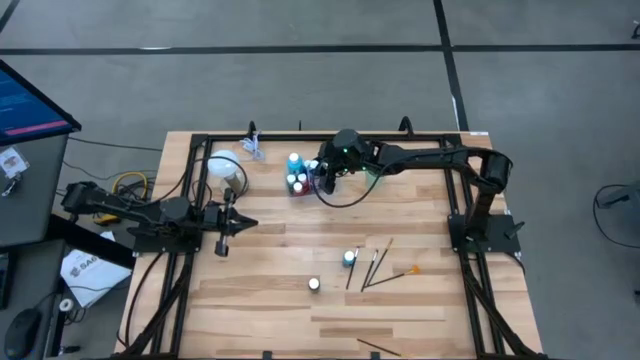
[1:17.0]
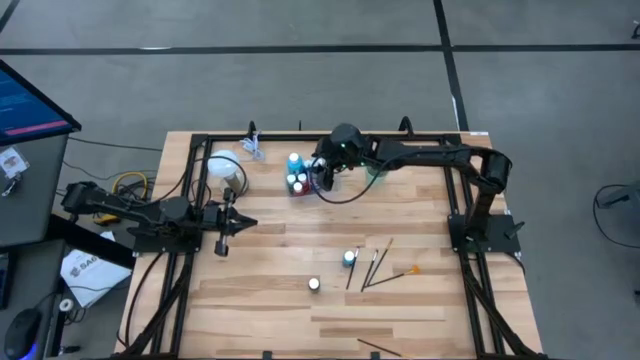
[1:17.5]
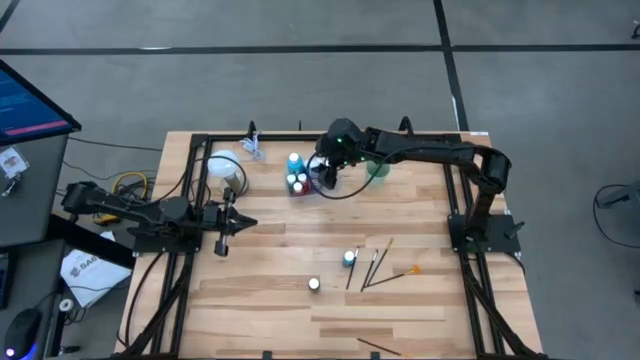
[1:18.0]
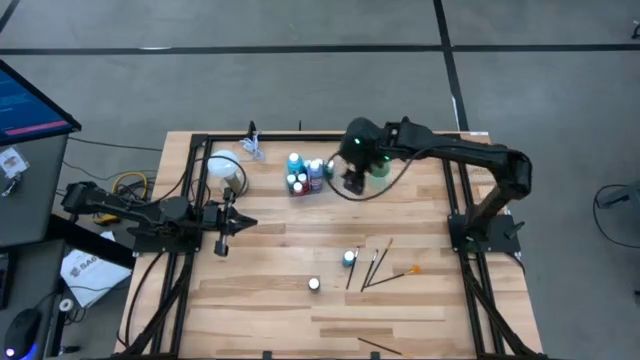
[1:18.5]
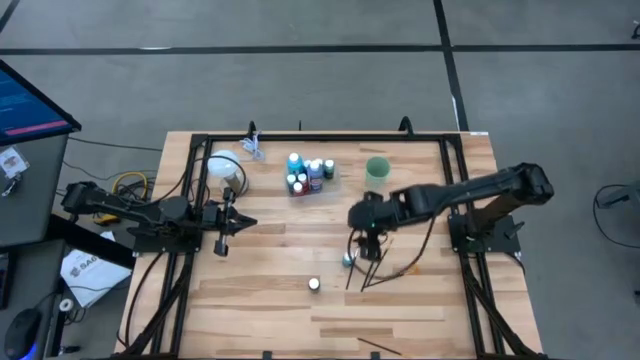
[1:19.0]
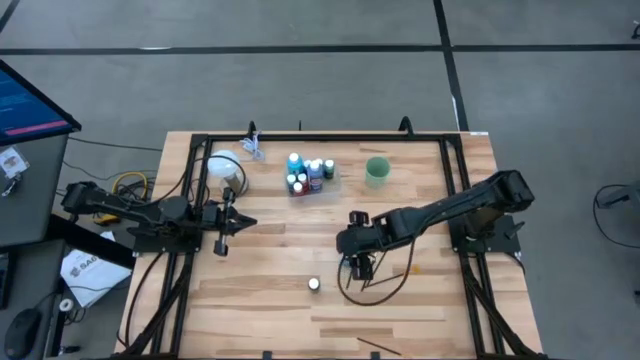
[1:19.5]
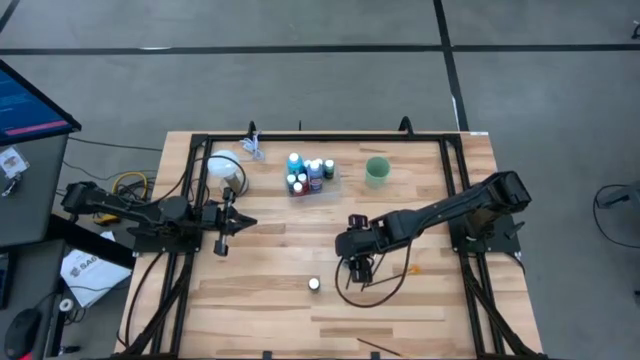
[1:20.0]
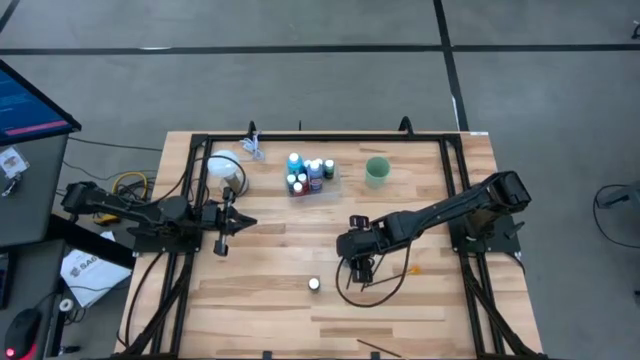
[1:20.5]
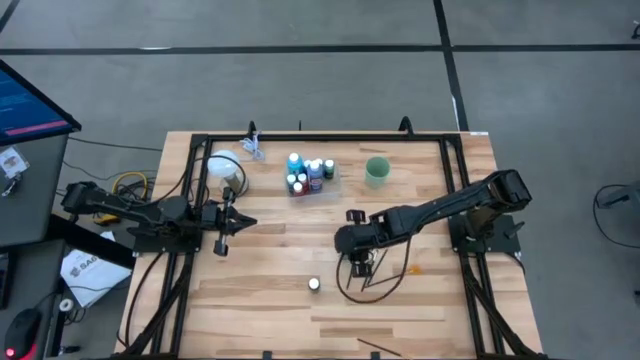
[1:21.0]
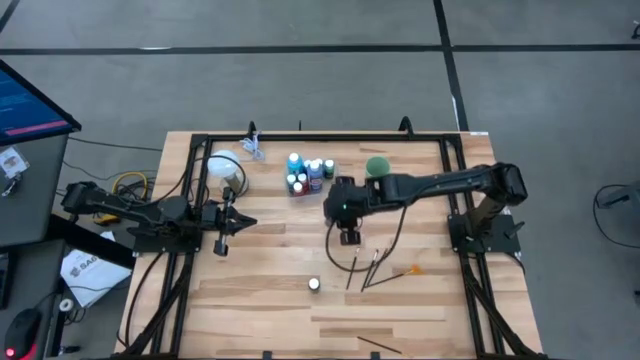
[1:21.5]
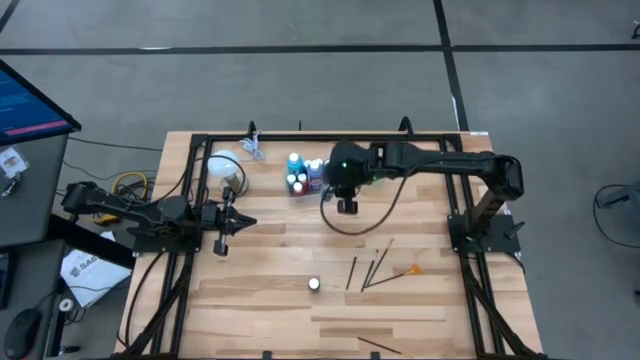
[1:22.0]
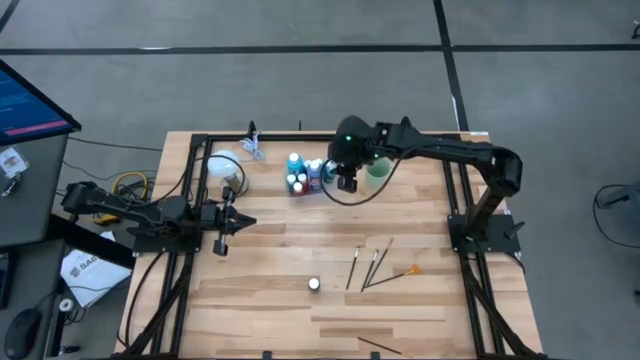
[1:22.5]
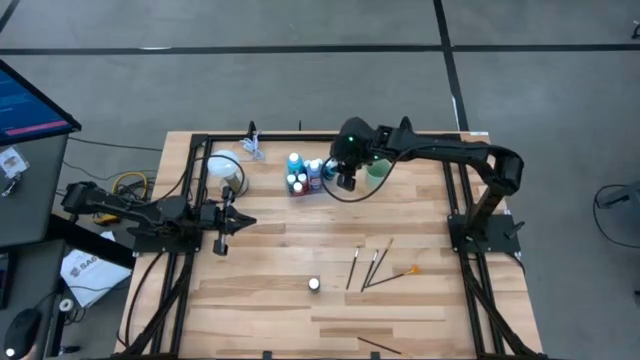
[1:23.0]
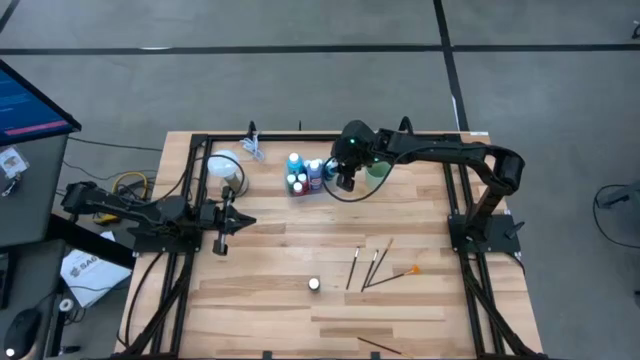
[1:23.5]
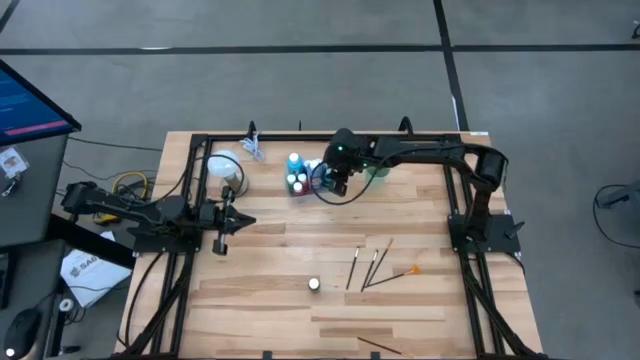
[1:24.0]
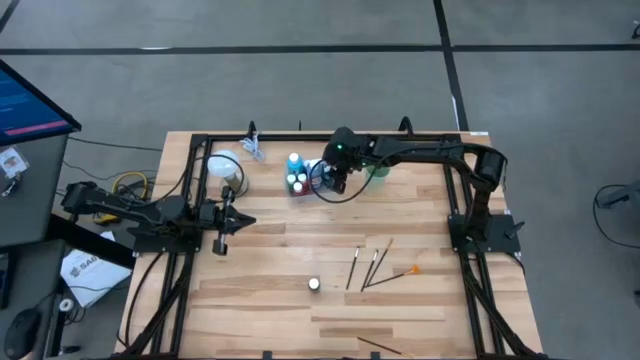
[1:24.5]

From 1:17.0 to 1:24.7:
Task: Pick & Place Paint Supplies
Put the small light blue paint bottle into the bin

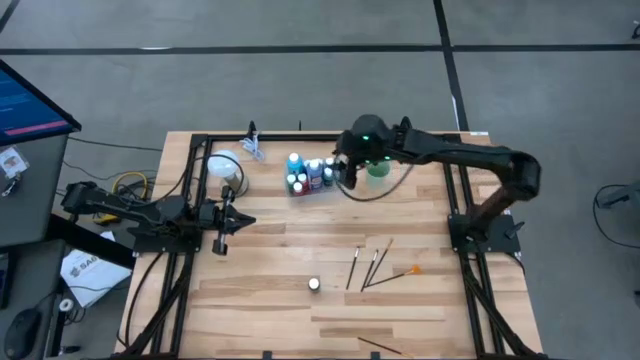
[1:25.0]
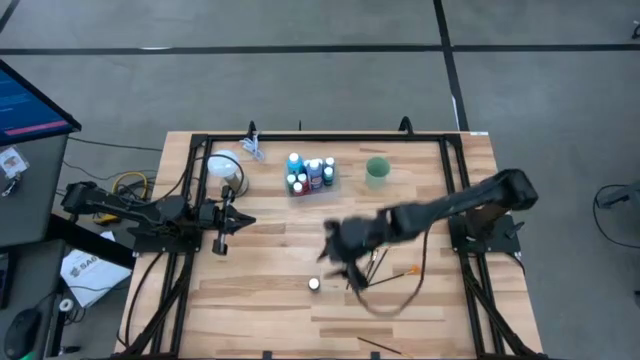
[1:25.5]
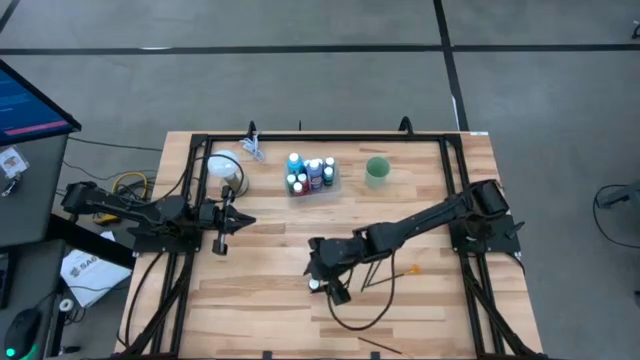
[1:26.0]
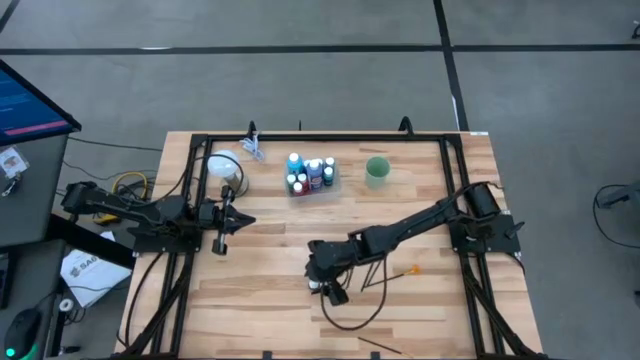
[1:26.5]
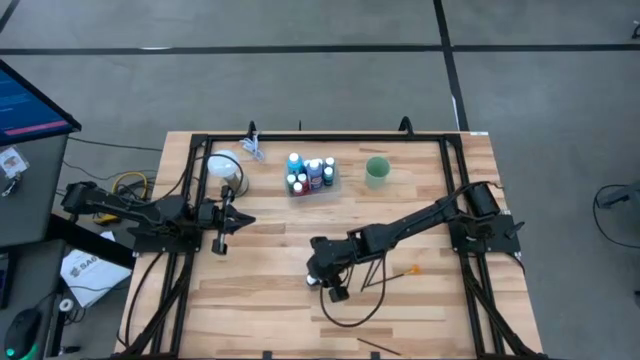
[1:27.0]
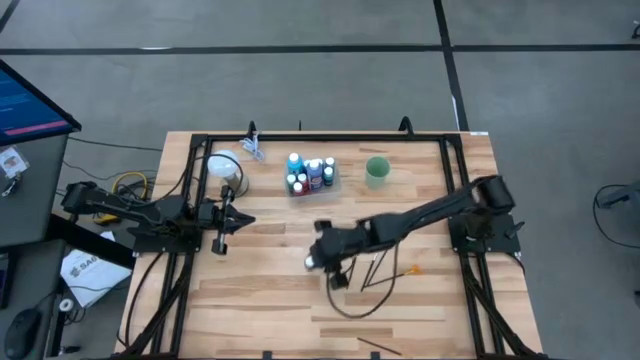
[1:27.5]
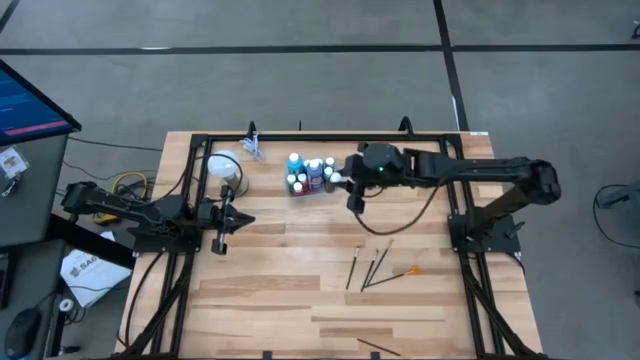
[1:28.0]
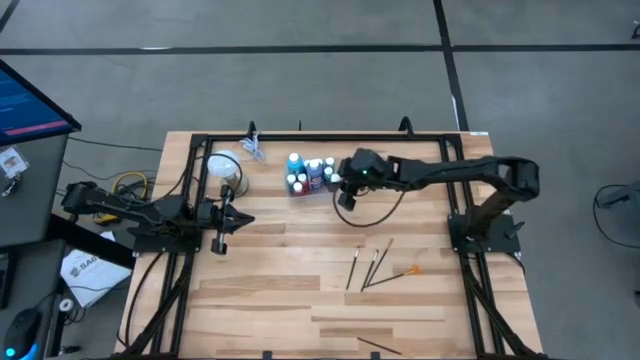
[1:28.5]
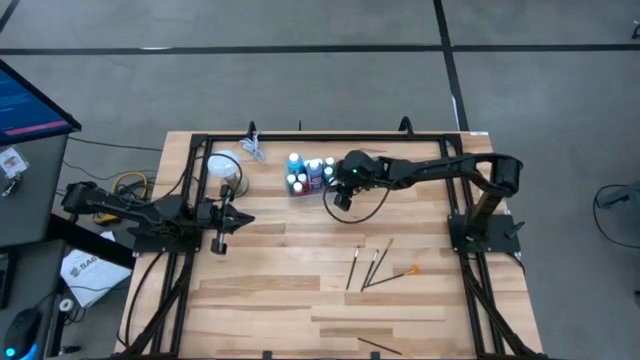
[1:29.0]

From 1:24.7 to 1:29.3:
Put the small black paint bottle into the bin

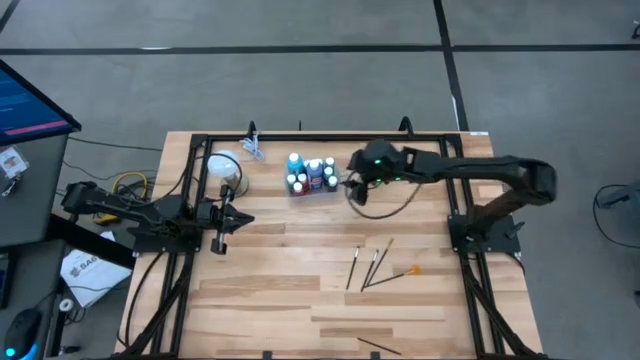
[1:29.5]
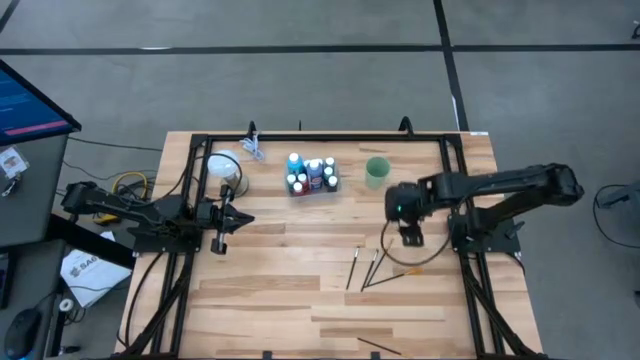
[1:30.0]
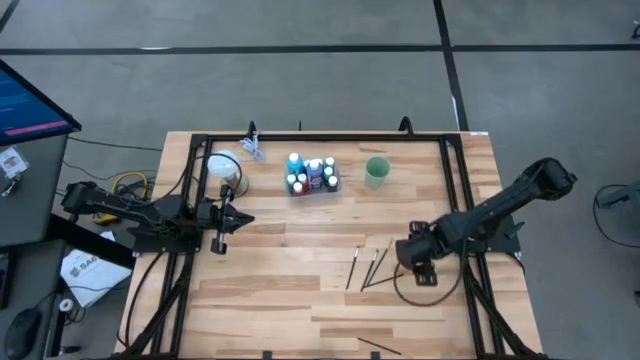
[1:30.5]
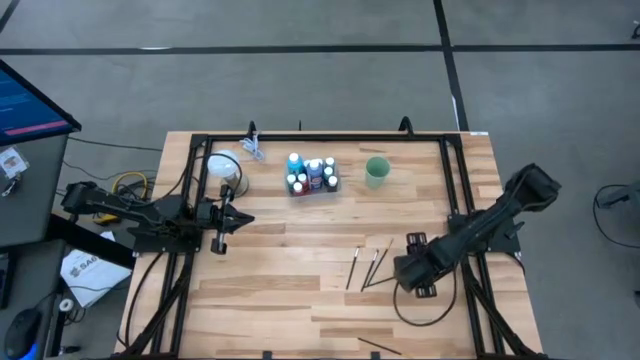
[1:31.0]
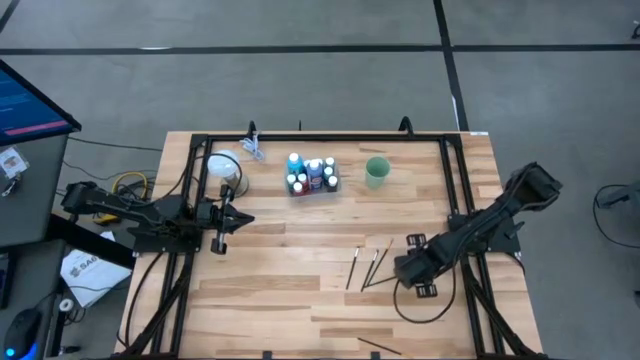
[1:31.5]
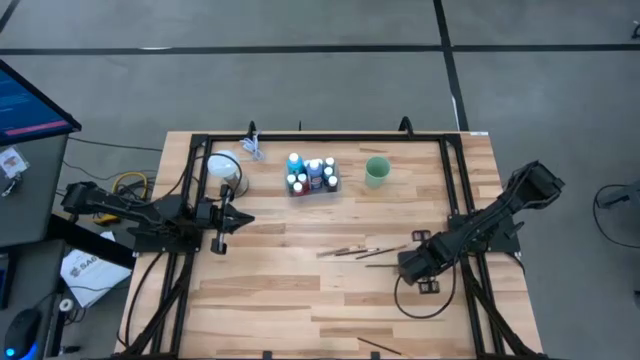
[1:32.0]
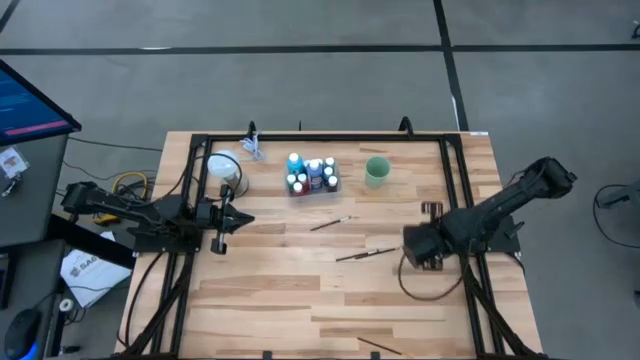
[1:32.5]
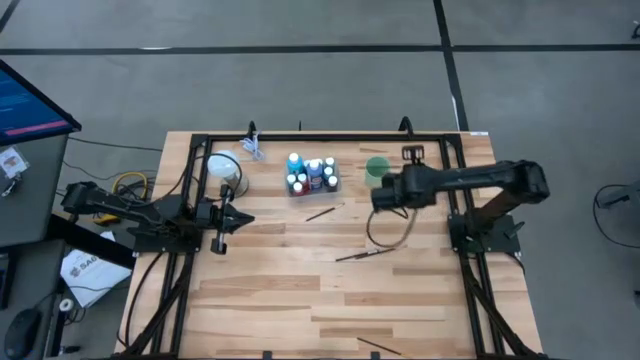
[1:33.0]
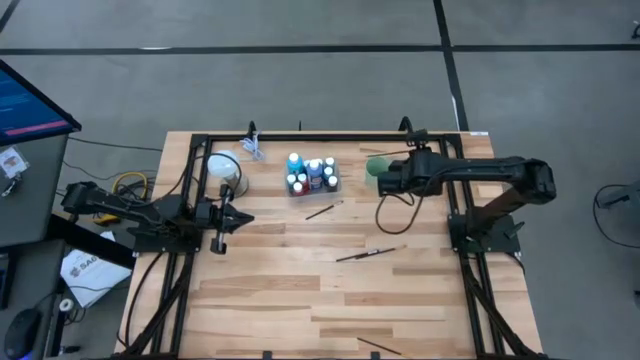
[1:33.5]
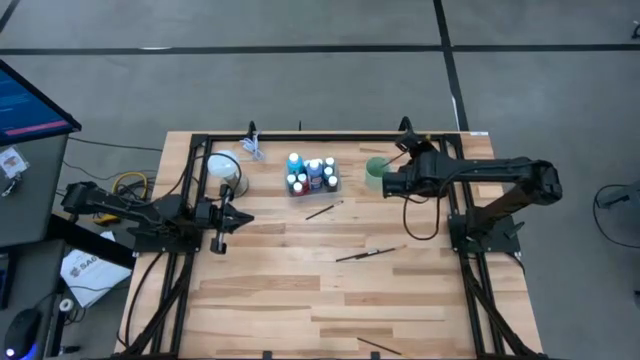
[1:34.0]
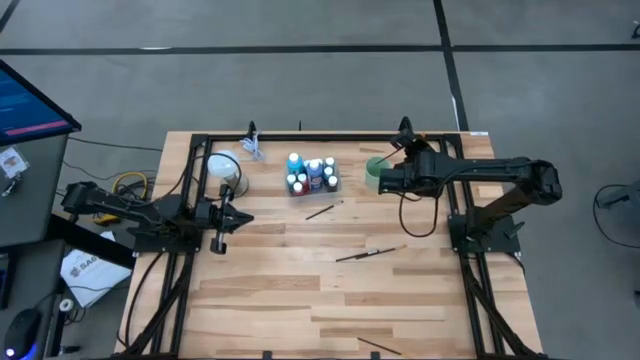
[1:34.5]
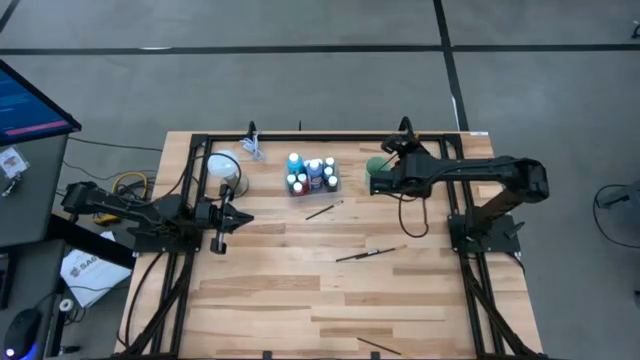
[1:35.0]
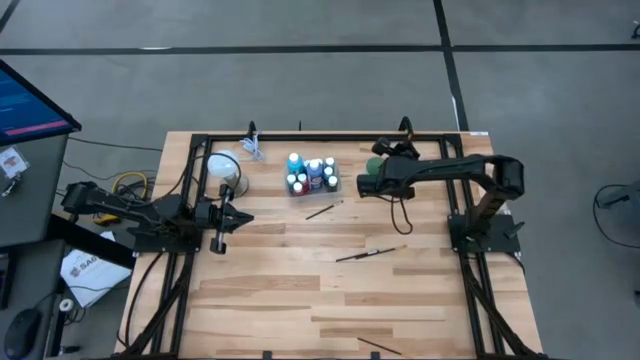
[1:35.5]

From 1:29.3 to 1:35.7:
Put the gold paint brush into the cup

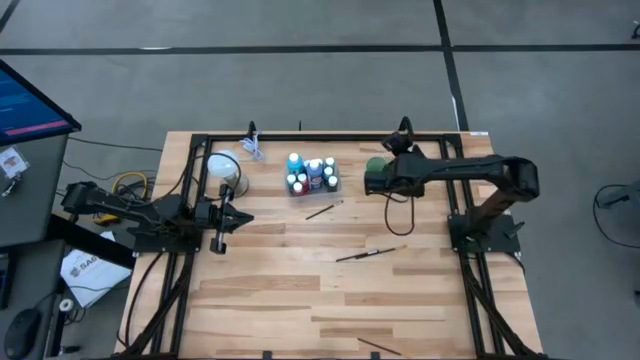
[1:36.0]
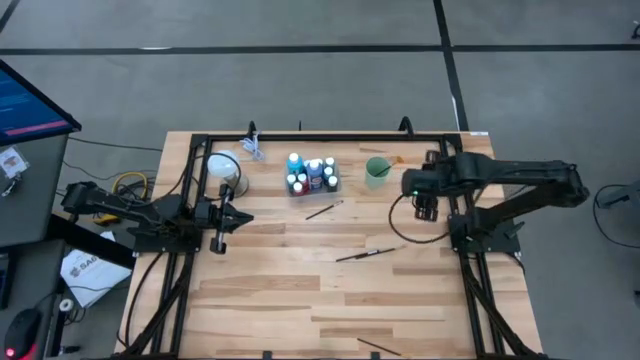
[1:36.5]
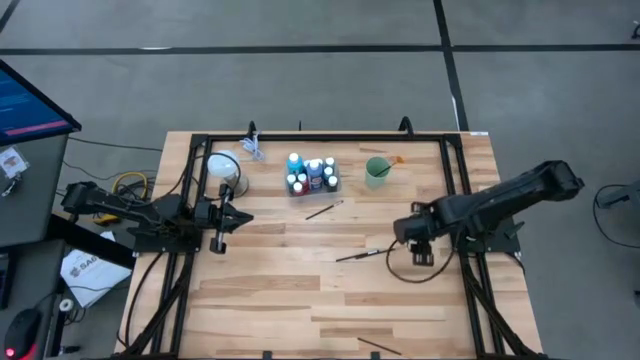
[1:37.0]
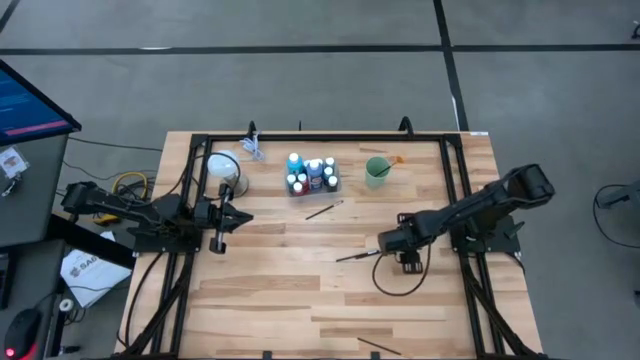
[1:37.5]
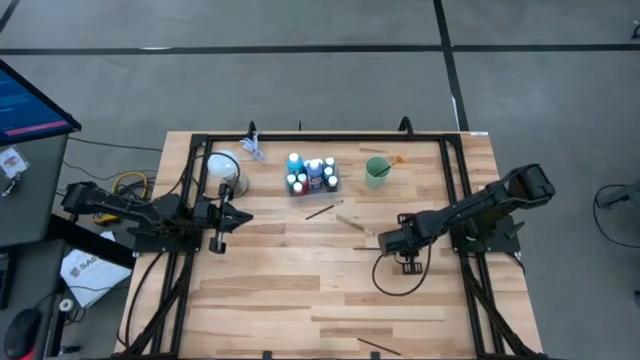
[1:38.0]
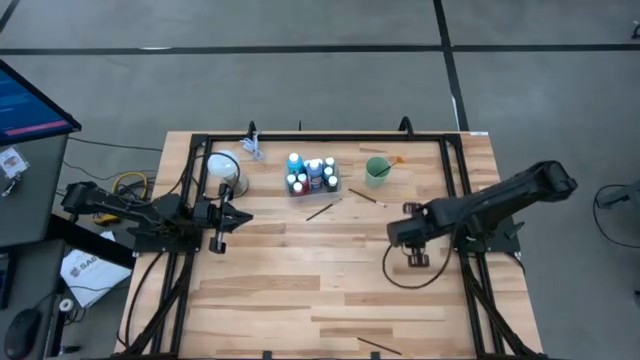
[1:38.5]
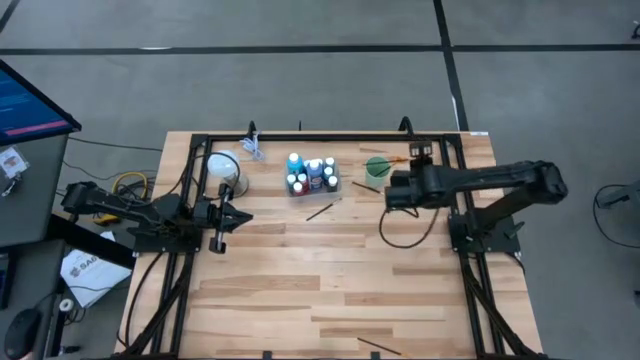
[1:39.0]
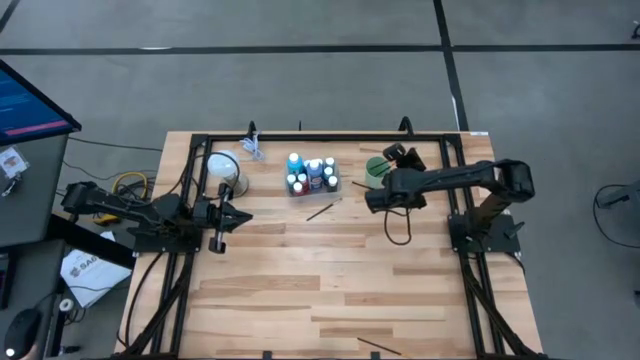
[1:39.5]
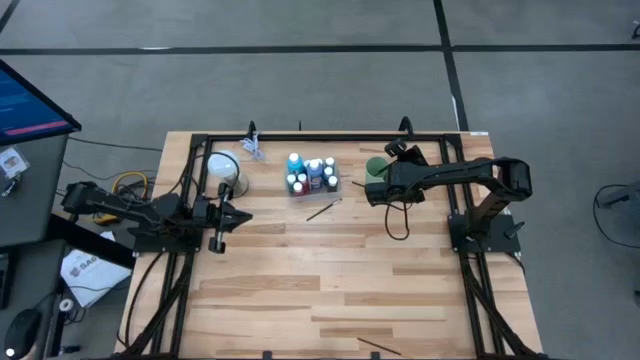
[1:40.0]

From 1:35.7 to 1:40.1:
Put the top gold paint brush into the cup
